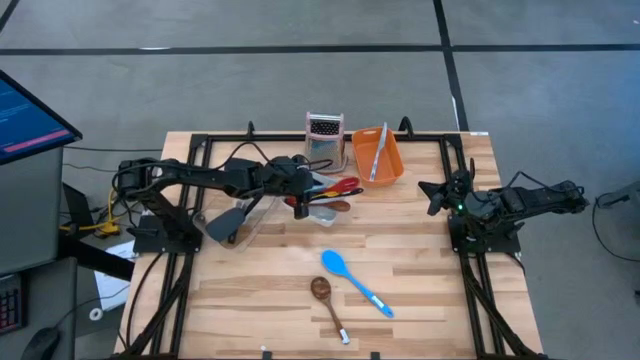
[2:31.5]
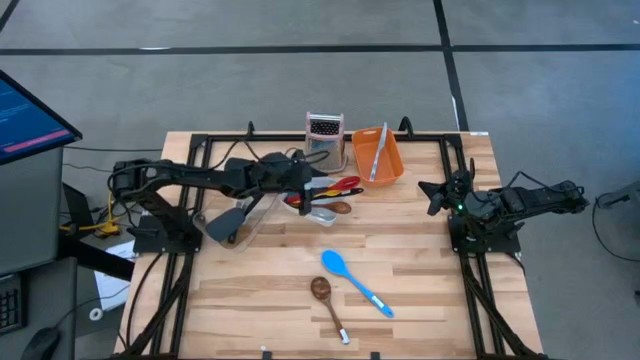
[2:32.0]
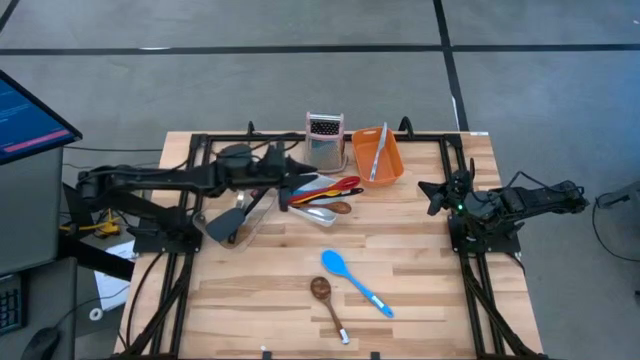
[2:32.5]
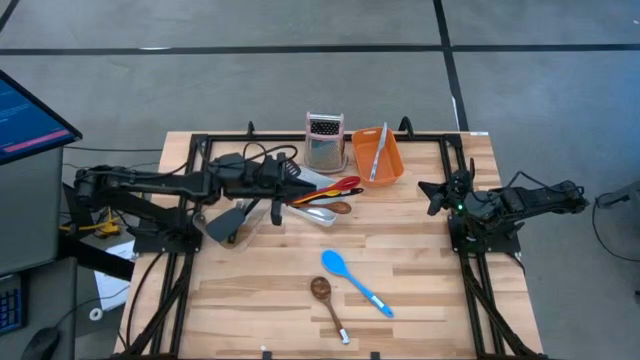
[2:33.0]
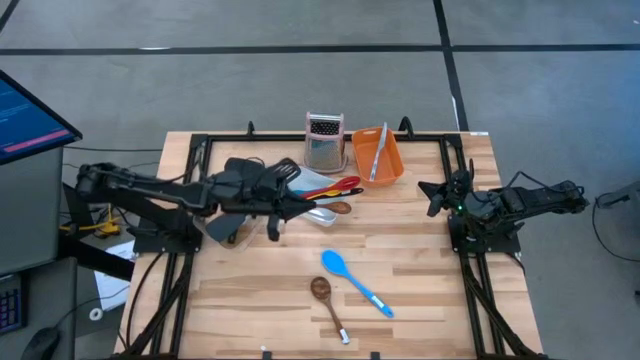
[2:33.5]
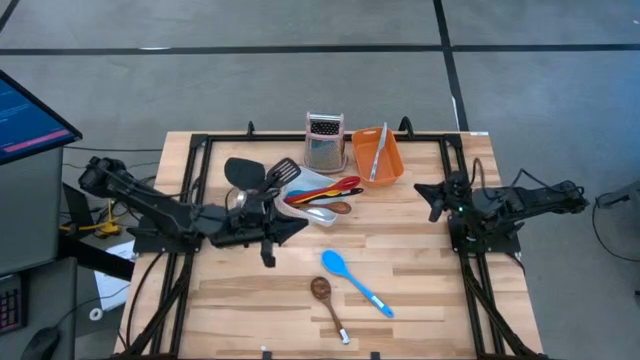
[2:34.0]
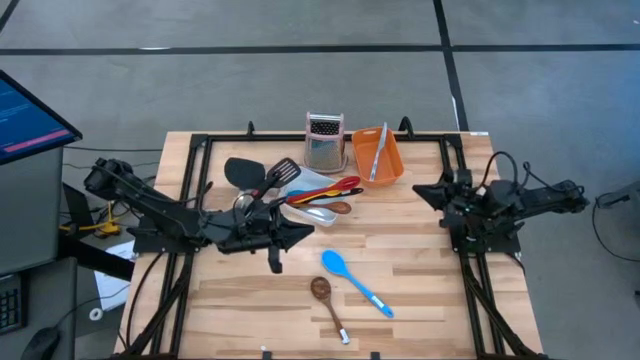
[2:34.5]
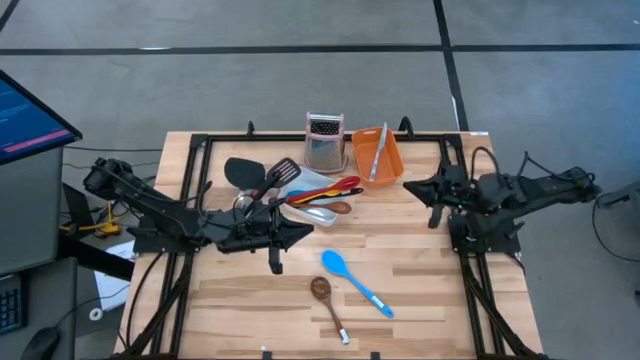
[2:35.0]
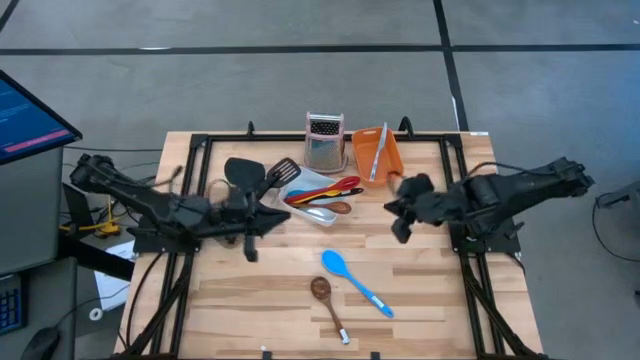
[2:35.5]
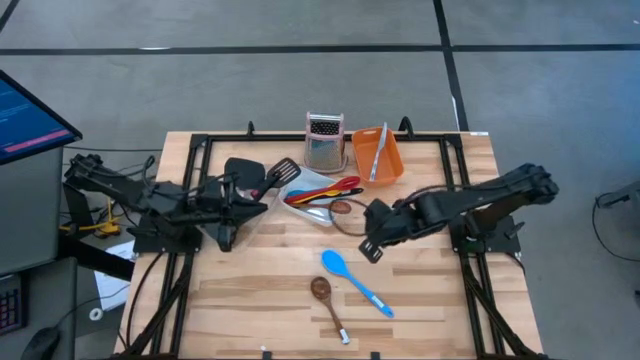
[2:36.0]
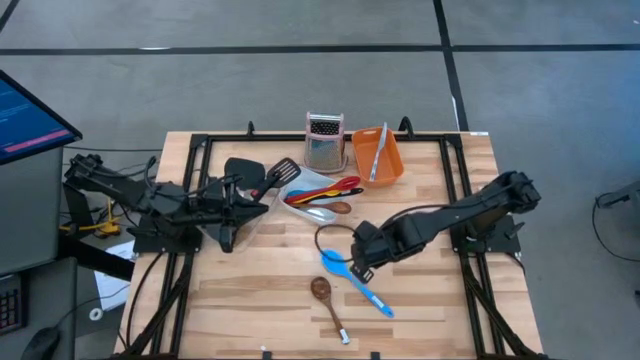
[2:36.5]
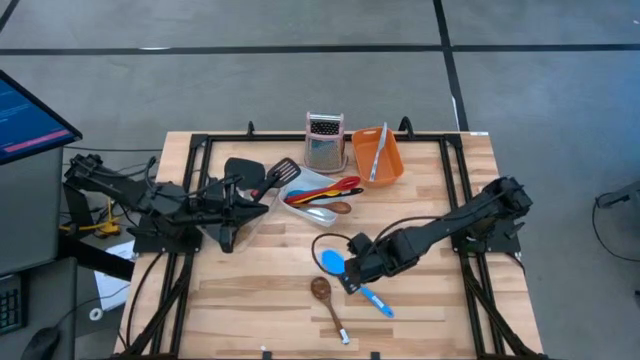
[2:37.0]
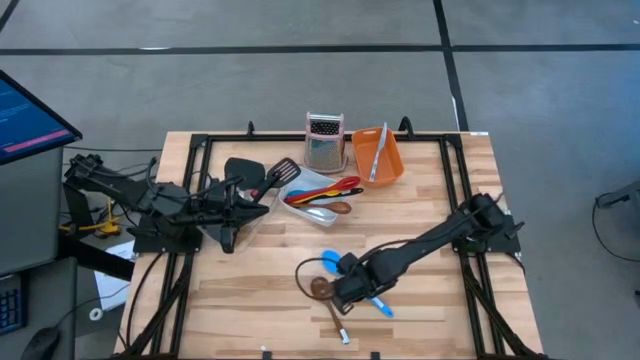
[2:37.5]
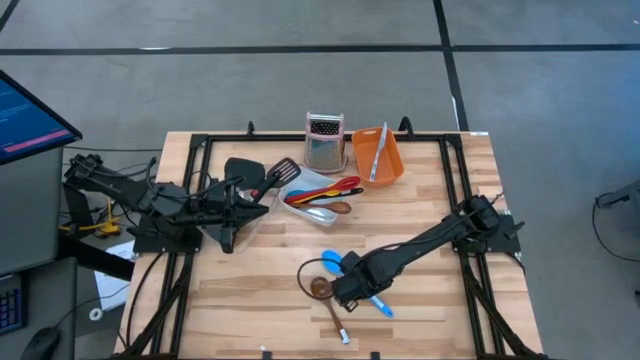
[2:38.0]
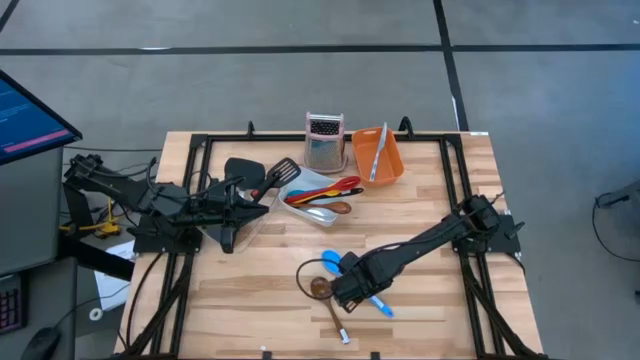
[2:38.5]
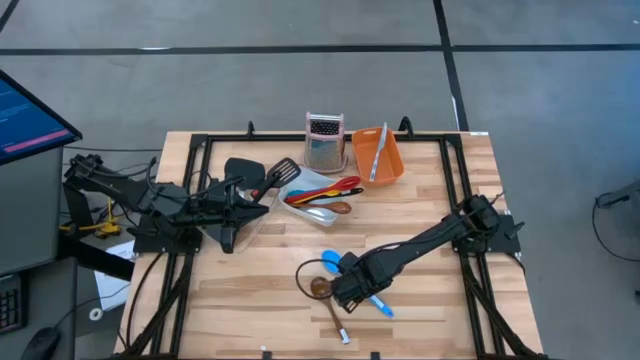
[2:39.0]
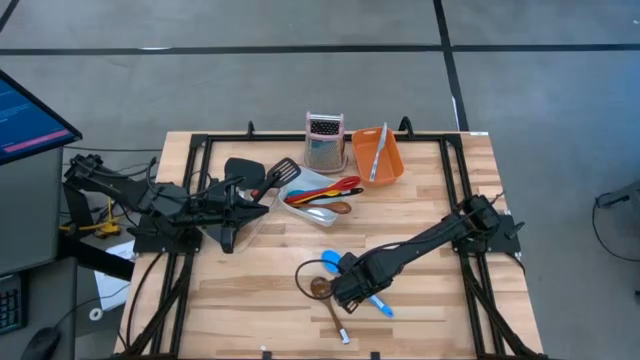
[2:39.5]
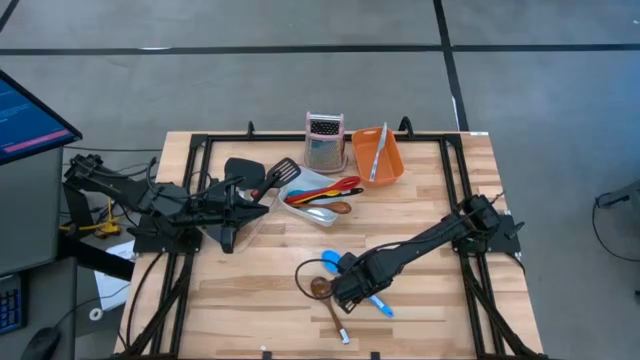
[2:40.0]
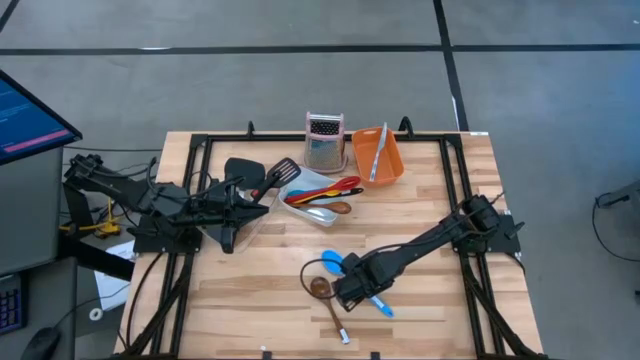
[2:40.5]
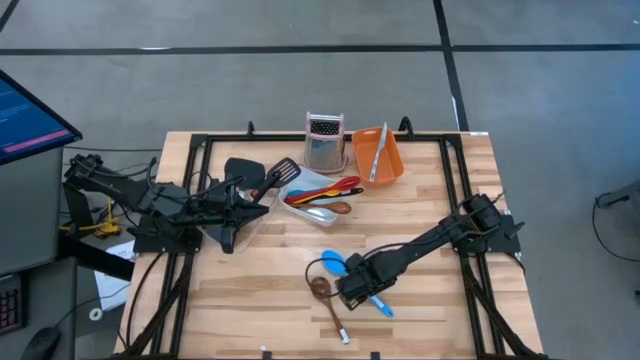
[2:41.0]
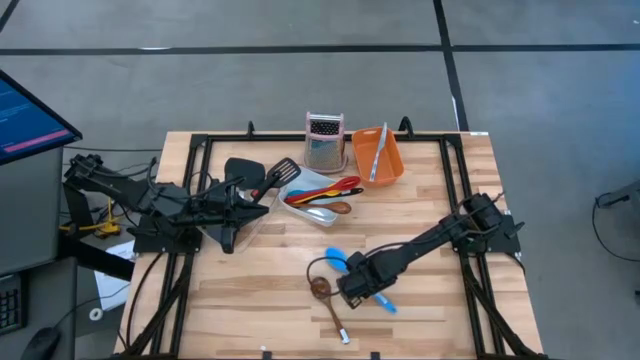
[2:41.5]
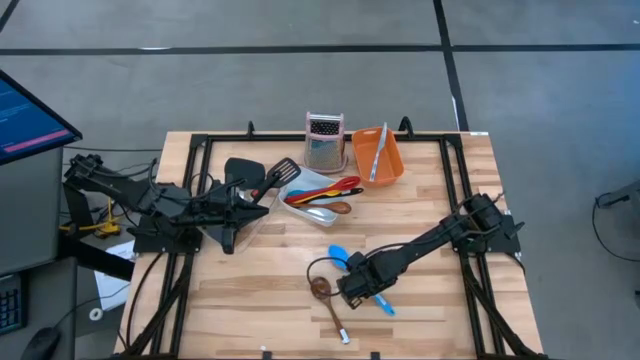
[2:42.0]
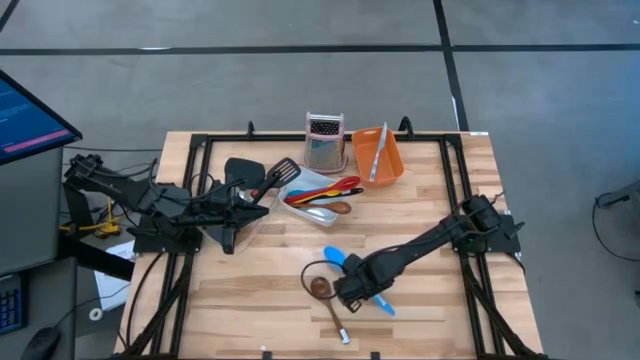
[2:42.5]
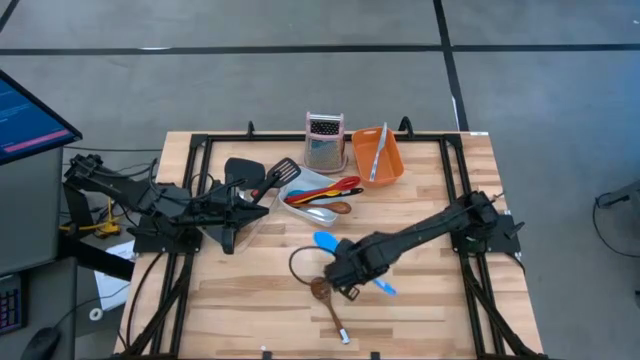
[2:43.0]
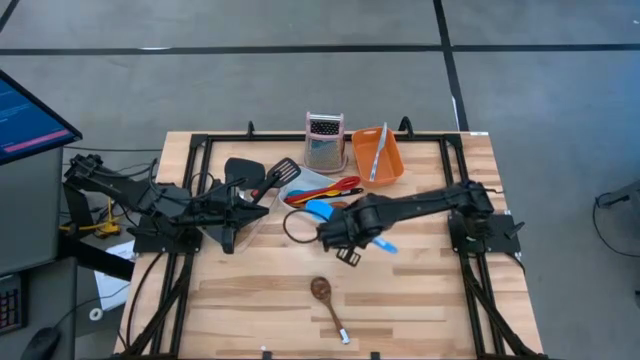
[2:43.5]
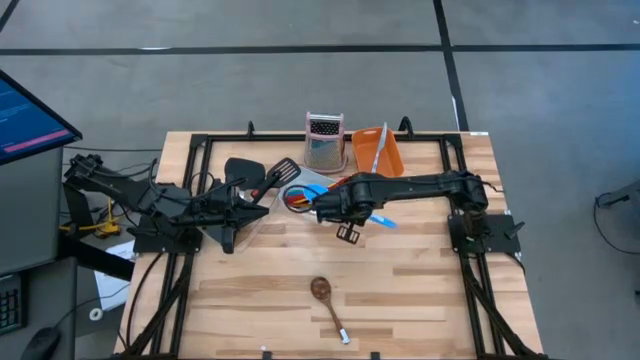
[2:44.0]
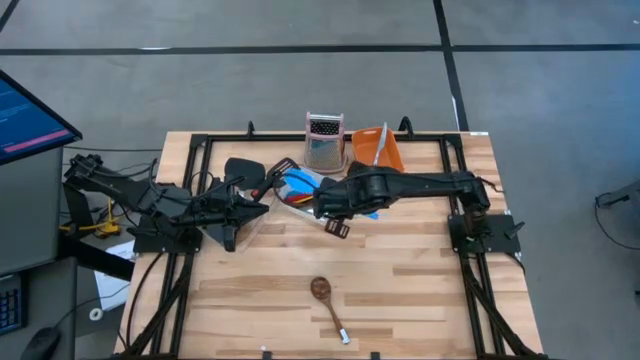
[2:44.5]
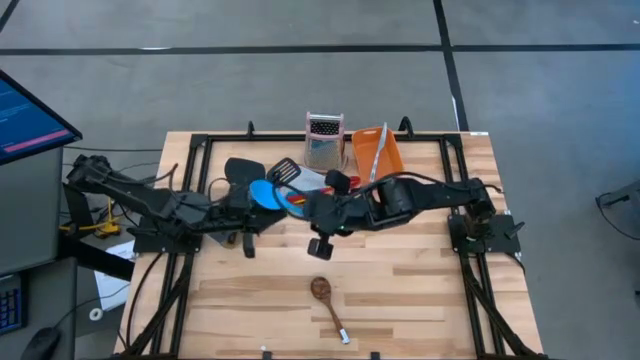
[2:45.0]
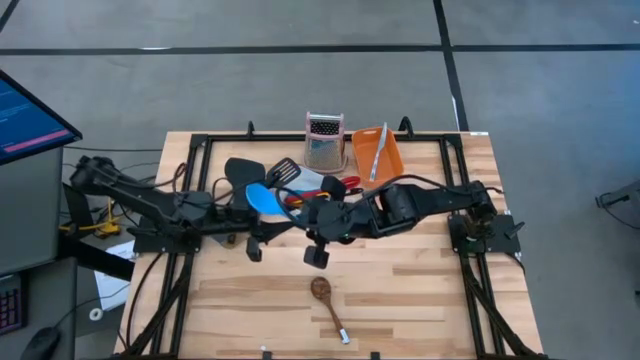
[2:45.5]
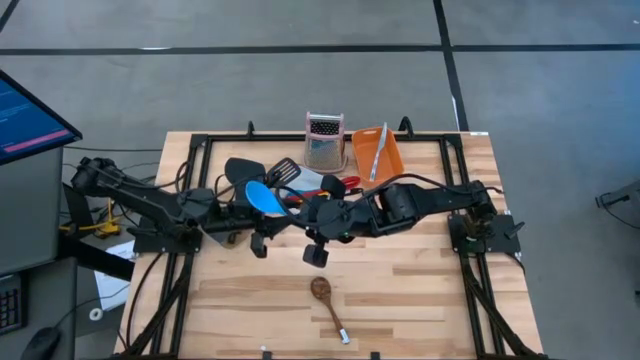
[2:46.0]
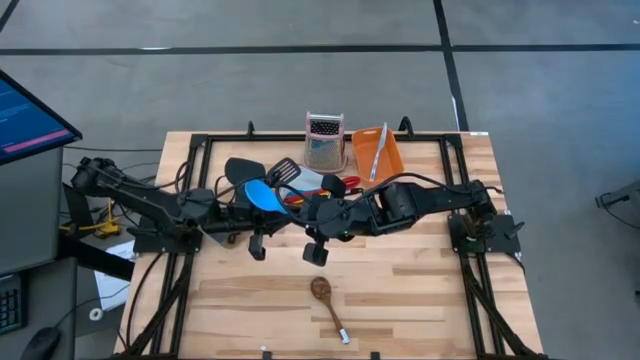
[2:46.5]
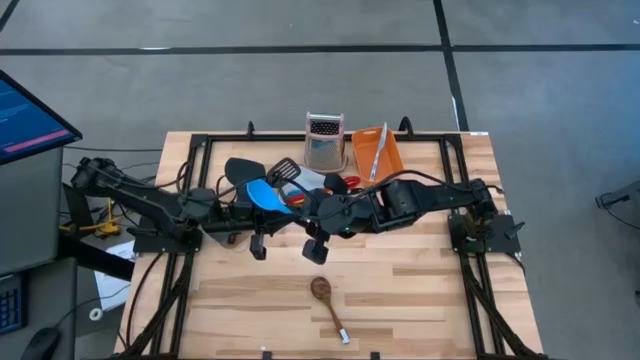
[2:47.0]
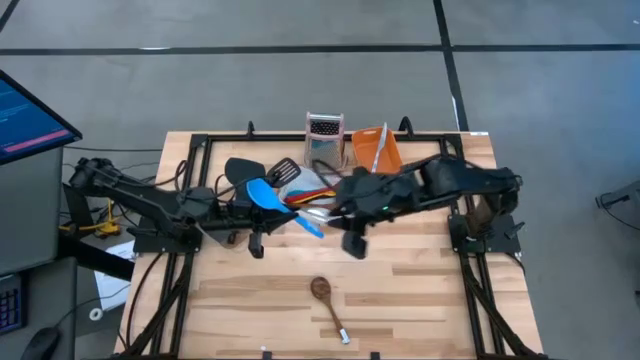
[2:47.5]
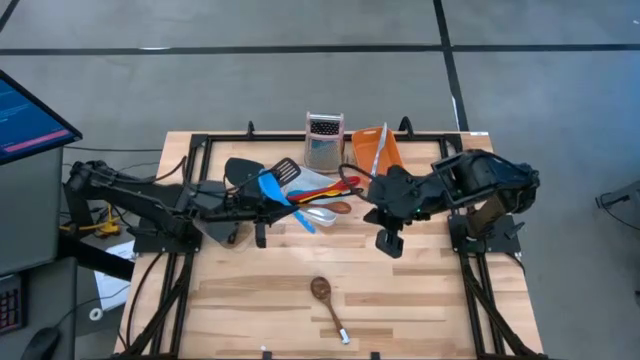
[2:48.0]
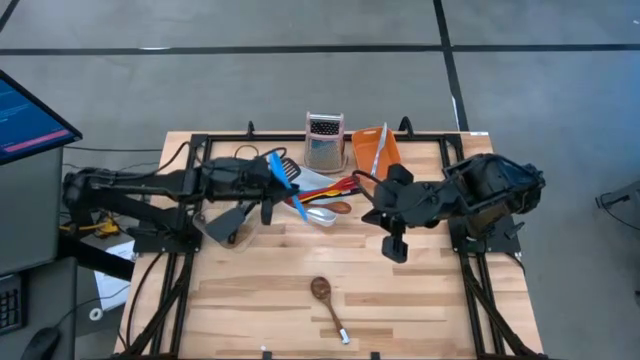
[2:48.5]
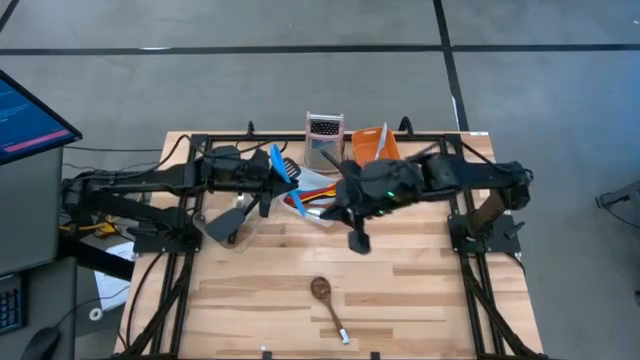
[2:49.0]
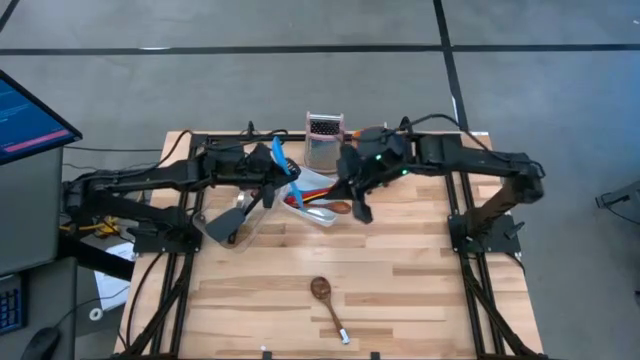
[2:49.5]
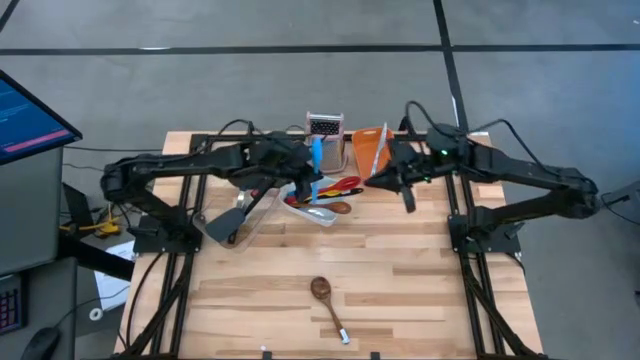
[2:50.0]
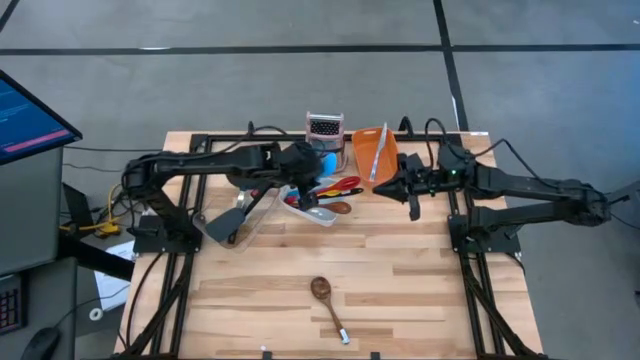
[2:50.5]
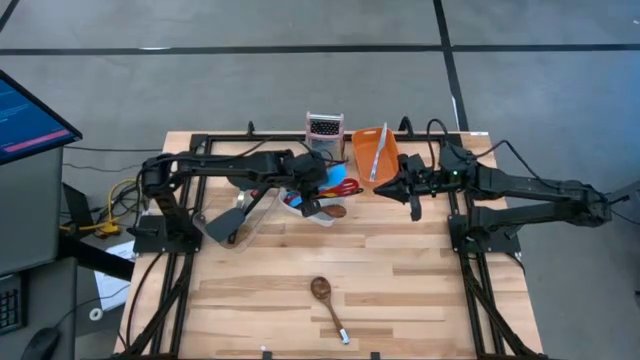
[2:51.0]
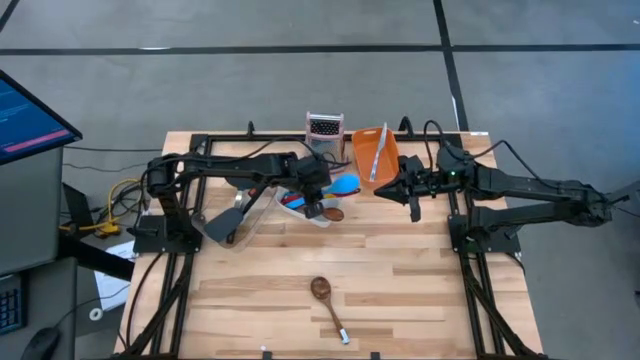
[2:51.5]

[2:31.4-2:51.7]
Task: Pick & Place Kitchen Items
Put the blue serving spoon into the white bin

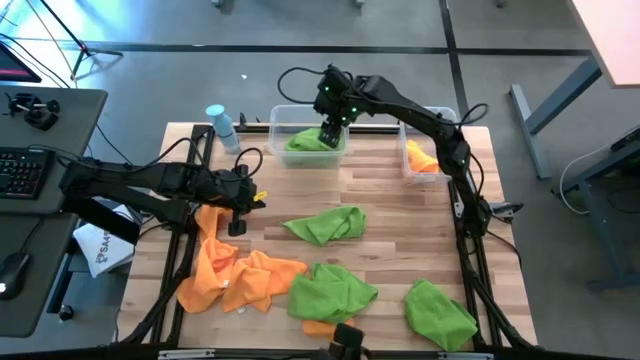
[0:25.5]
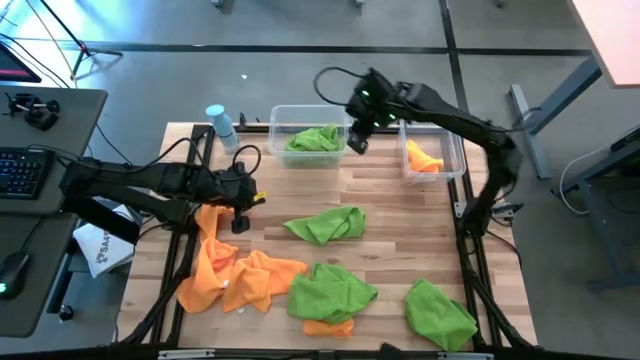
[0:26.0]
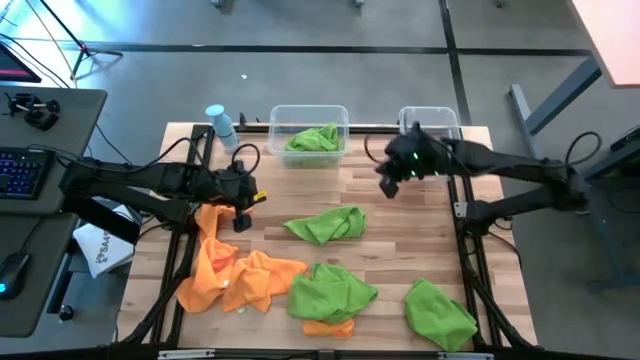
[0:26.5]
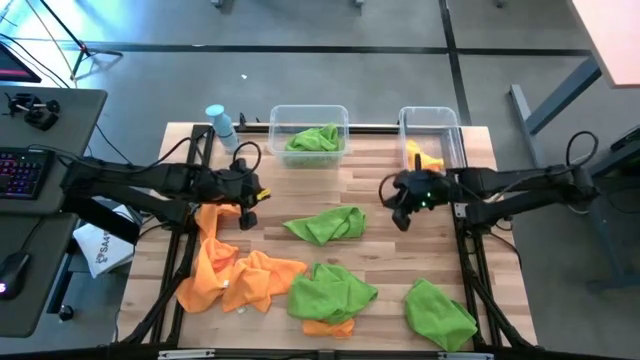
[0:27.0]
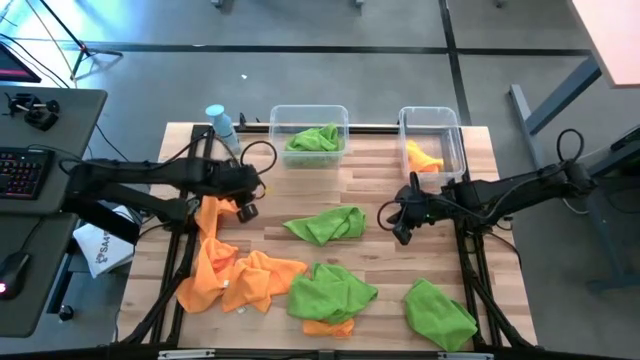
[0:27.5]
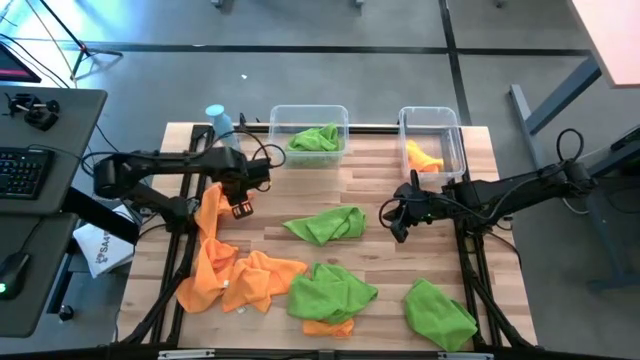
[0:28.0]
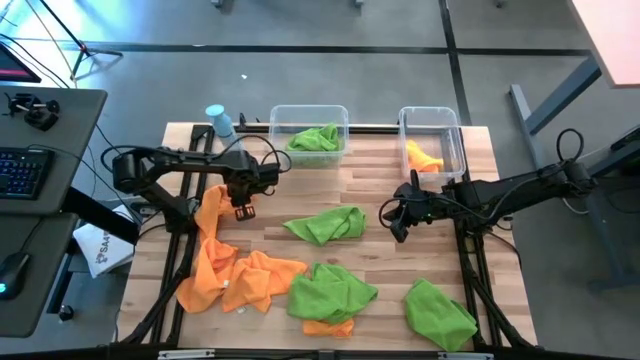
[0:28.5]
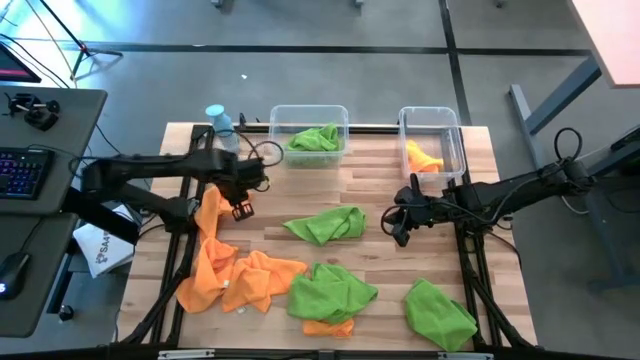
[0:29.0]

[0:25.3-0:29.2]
Task: Sort microfiber towel by color & place in baskets
Put the orange towel into the right transparent bin
